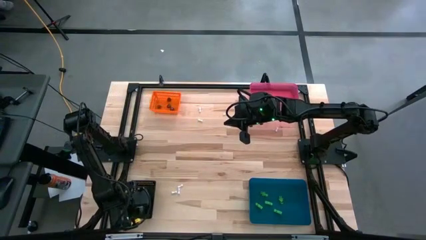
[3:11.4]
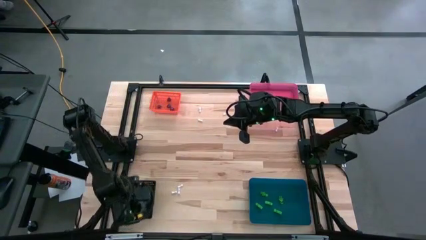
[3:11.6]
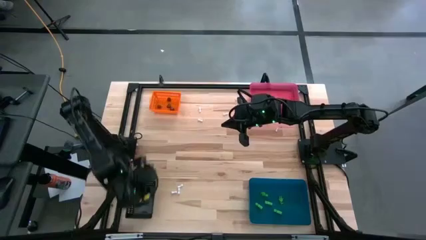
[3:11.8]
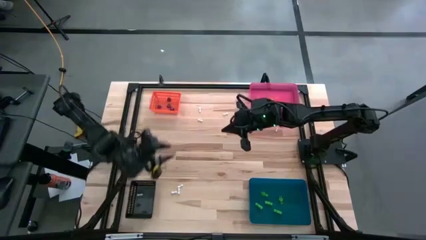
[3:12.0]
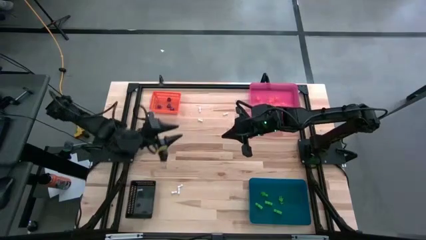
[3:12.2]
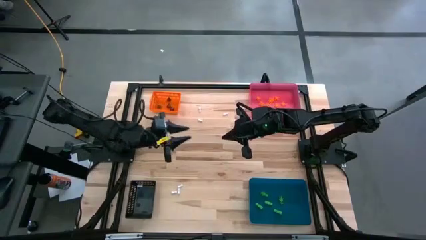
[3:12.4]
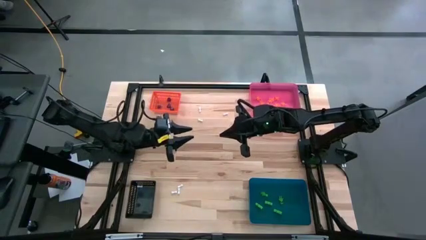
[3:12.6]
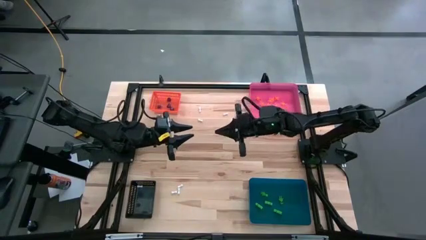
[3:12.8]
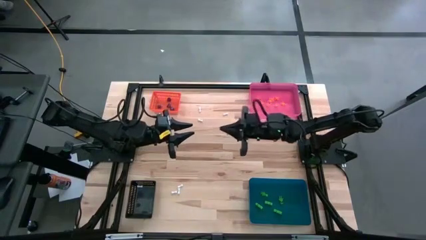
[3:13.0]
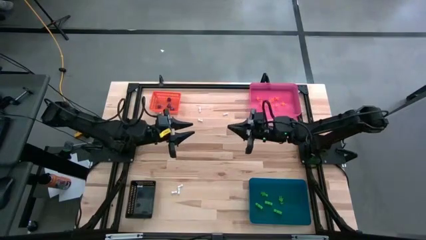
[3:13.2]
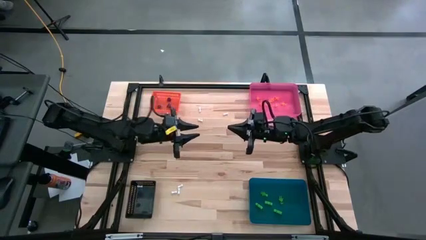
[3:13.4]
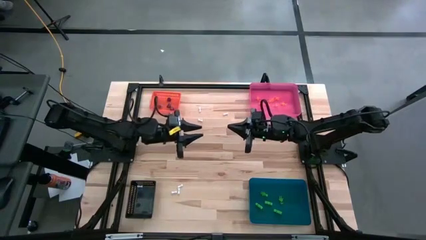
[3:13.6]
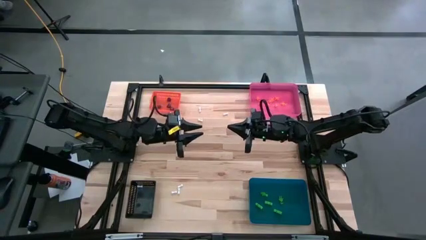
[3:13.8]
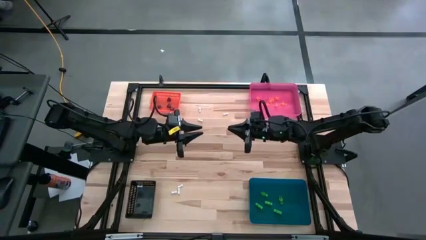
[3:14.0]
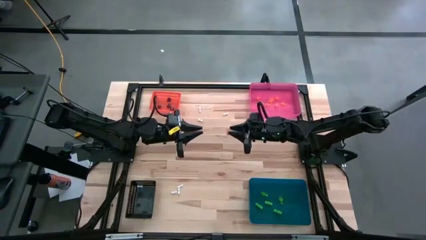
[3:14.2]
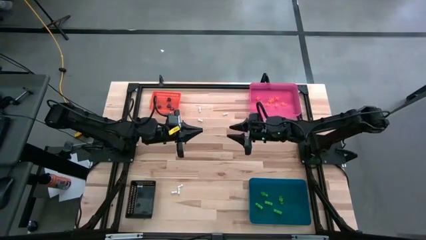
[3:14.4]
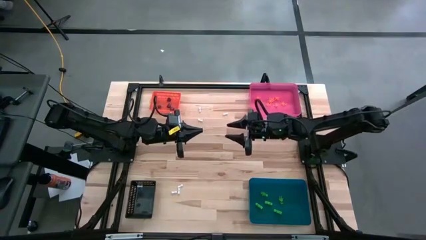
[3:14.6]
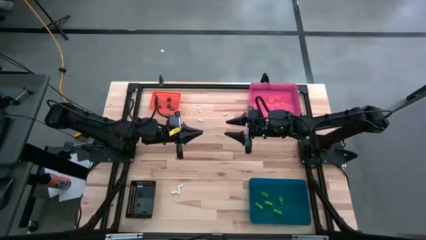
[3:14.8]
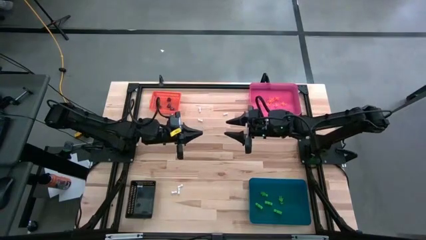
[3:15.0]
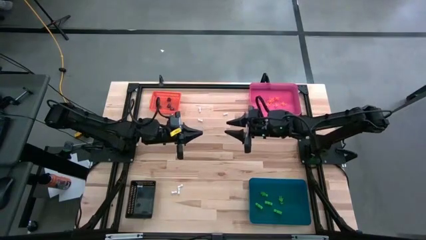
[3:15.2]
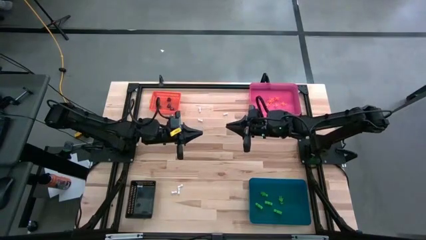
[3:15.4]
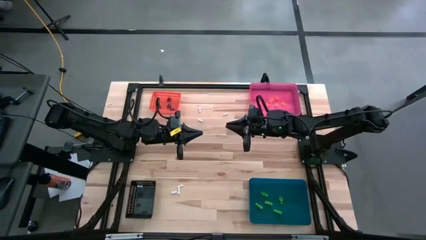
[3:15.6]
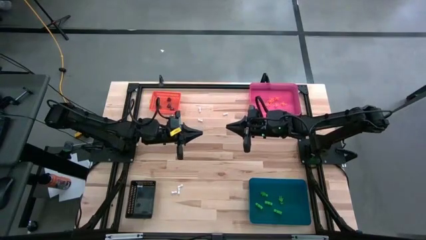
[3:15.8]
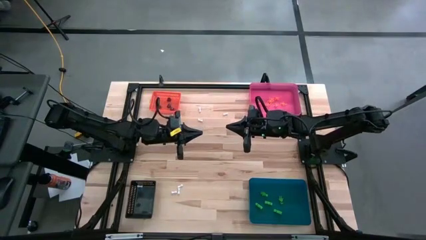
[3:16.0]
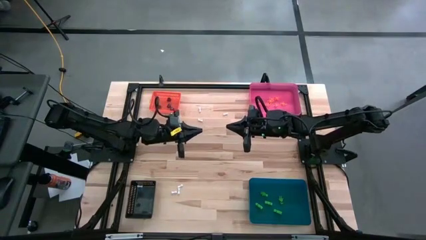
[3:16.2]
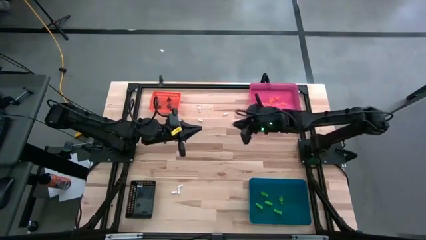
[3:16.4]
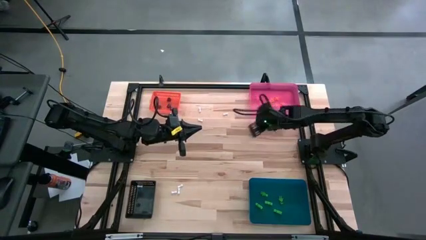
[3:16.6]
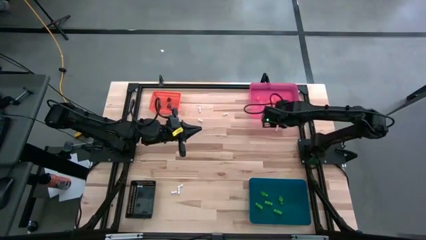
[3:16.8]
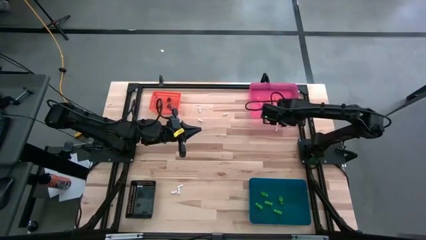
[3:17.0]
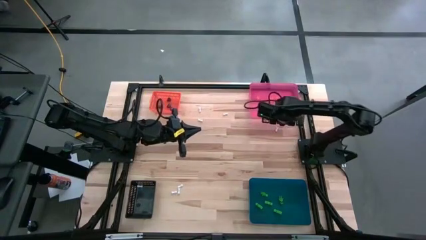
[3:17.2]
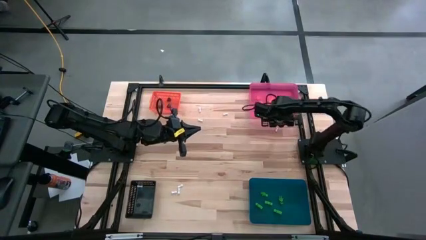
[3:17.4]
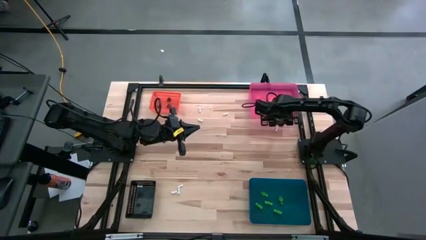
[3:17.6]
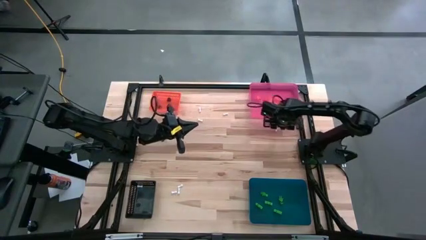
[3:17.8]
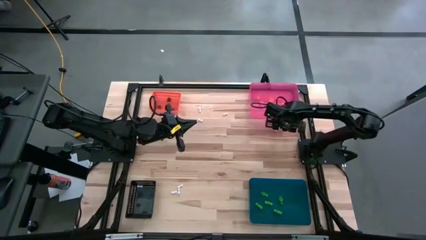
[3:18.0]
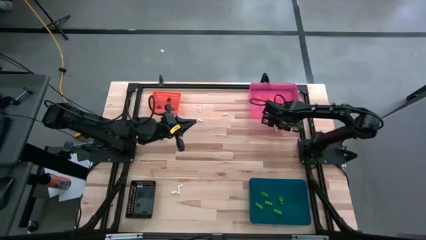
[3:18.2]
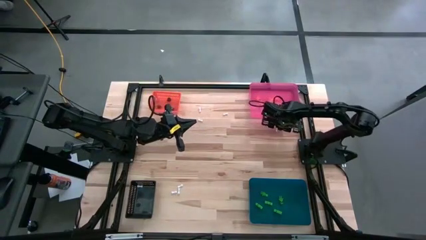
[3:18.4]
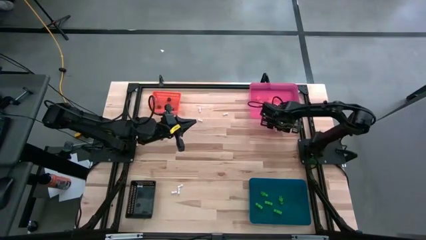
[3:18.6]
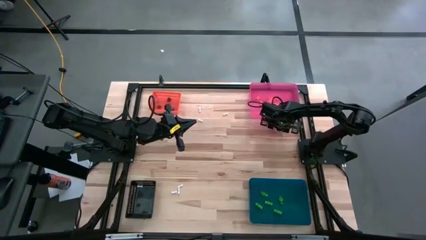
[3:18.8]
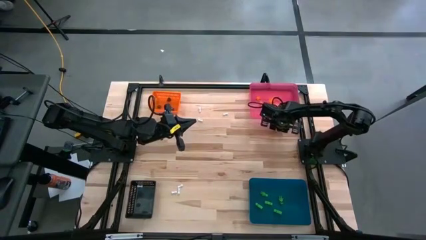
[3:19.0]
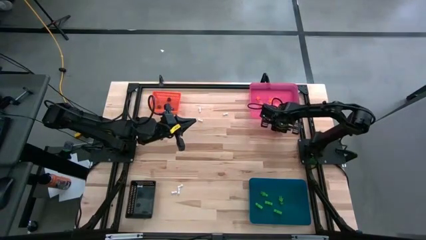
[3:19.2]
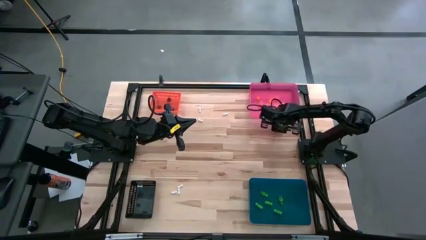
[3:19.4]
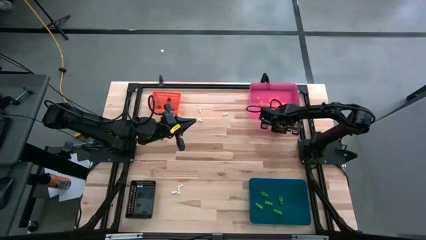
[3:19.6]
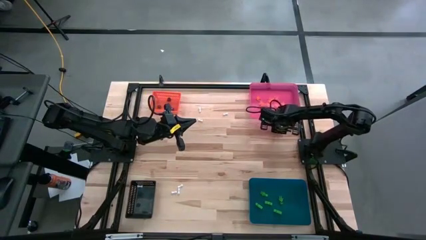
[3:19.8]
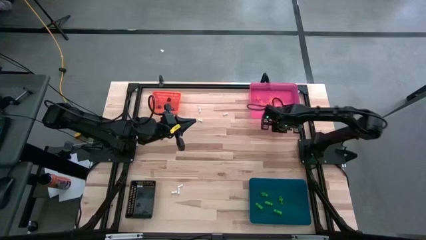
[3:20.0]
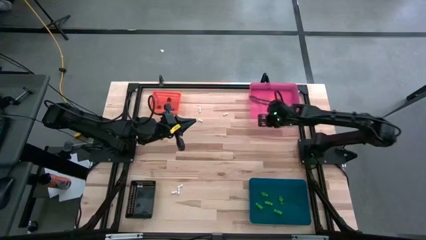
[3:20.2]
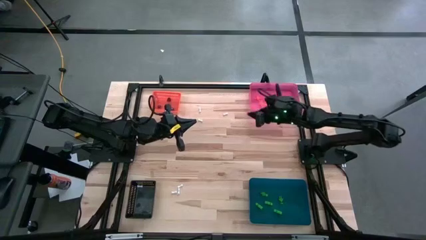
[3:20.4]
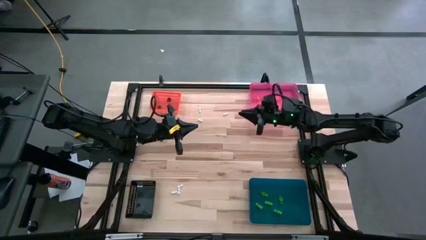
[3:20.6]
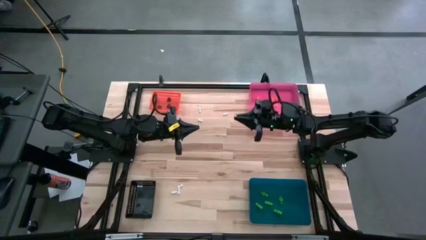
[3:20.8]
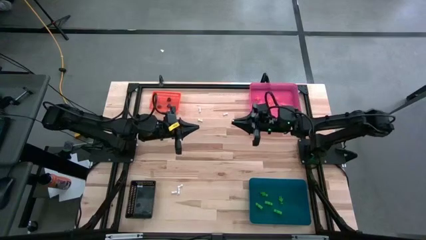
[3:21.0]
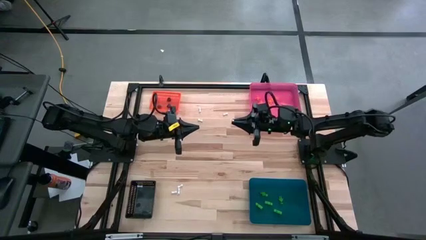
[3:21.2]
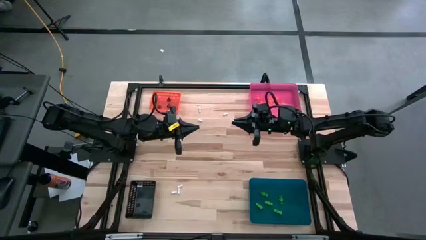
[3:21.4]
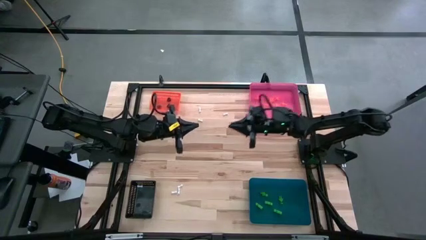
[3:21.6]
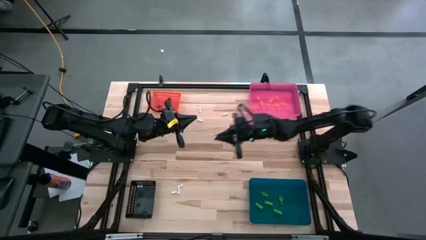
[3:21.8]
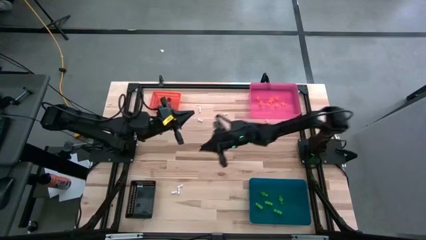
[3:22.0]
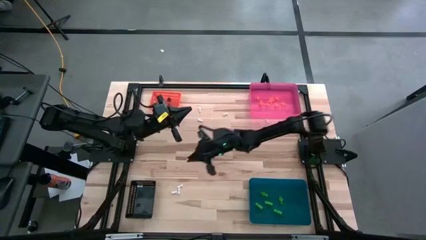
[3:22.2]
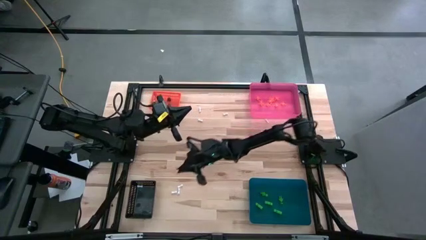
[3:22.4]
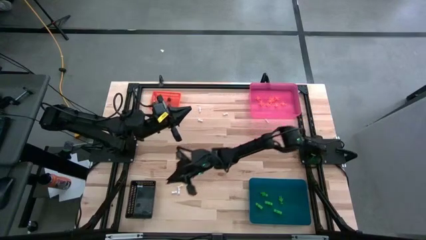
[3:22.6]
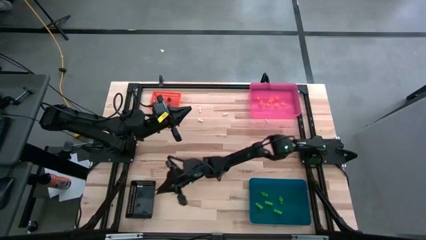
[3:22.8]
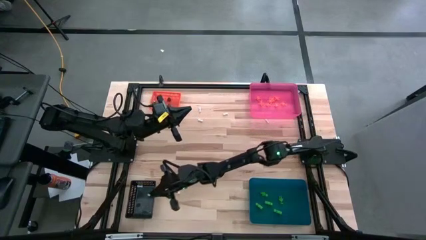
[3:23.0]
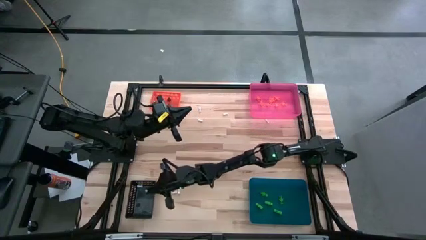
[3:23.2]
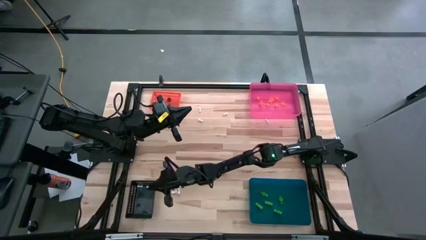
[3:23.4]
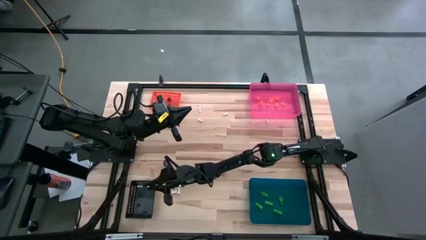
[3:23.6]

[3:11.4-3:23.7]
Task: Sort Halloween decoration
Put the white bone toy into the black bin

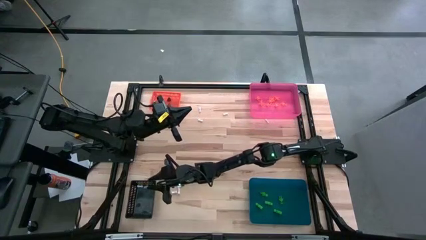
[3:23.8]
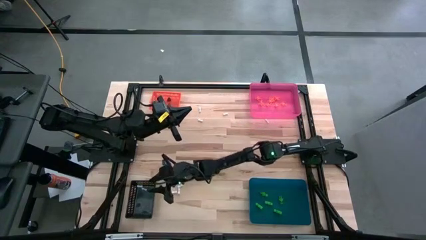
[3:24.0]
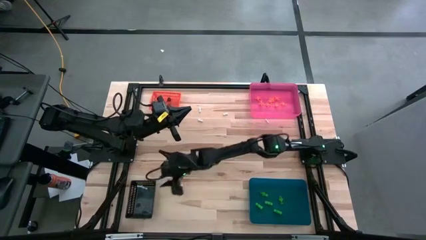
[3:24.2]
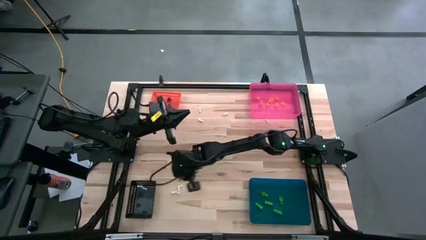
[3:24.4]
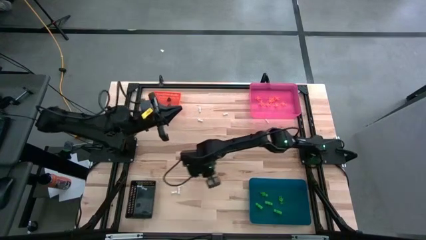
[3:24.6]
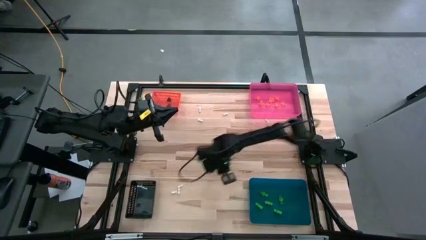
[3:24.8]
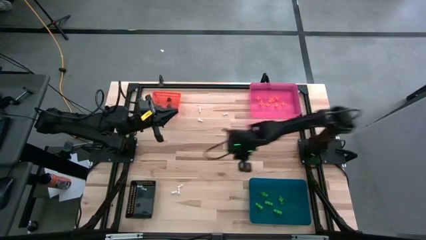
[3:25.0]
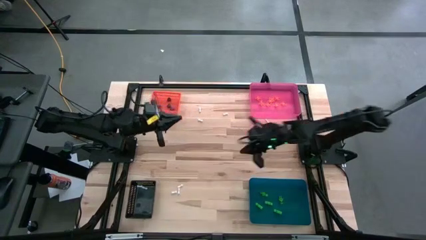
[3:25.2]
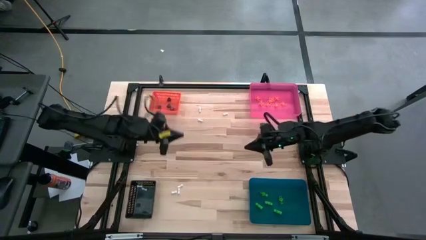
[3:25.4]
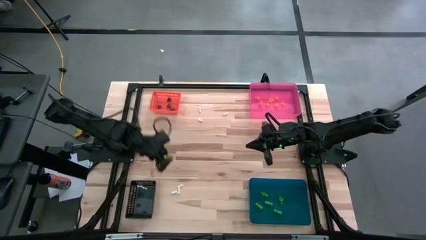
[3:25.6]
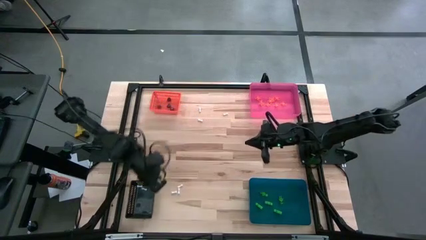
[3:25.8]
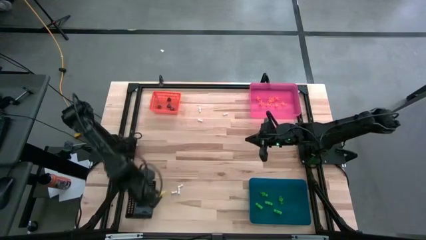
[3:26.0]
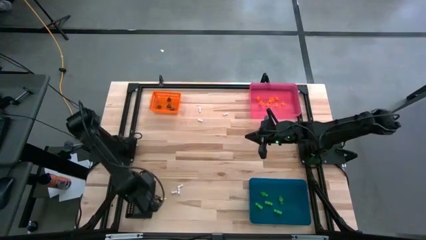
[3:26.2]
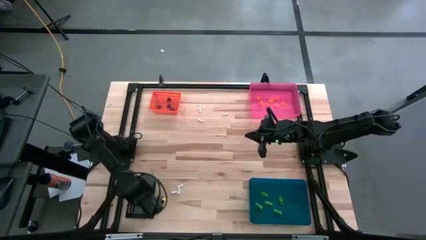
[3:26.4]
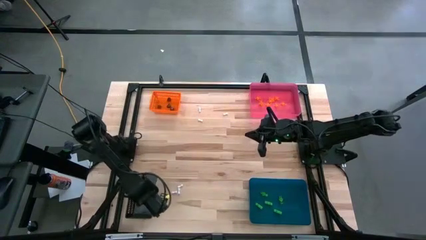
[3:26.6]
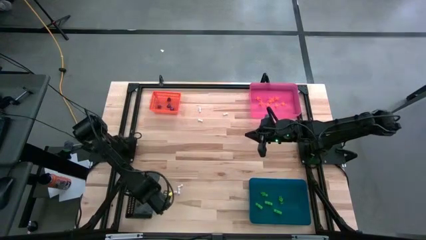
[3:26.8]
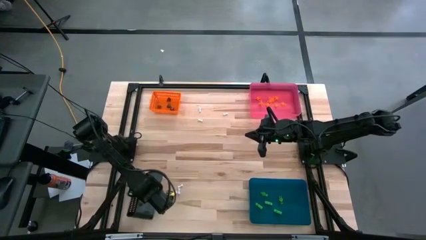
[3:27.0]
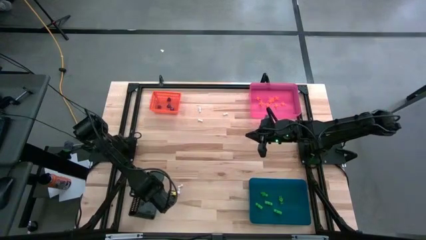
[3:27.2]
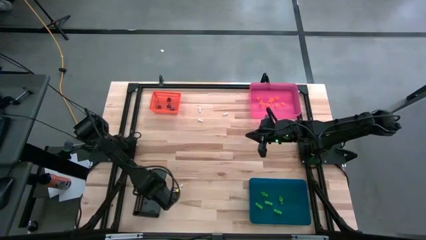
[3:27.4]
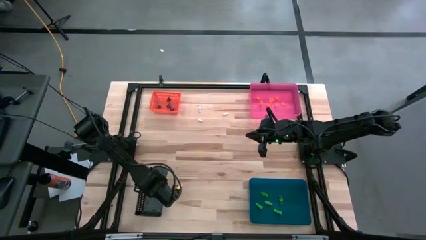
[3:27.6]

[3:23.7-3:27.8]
Adjust the black bin
